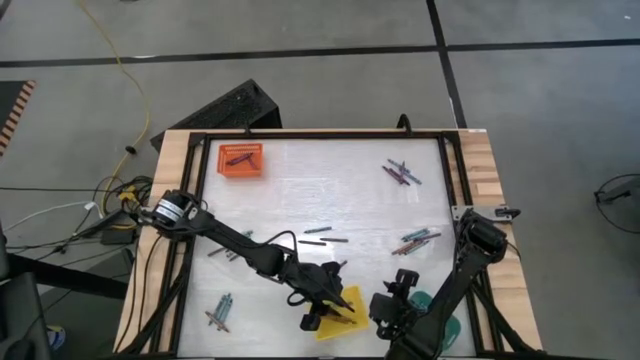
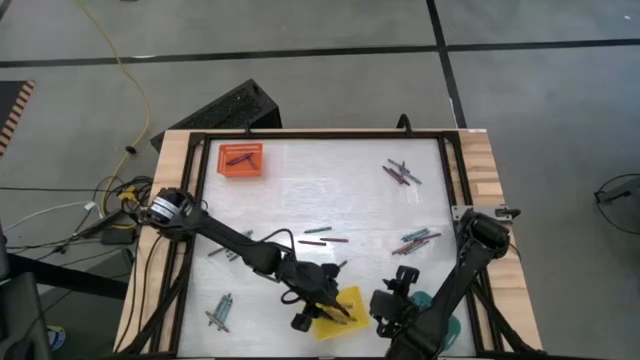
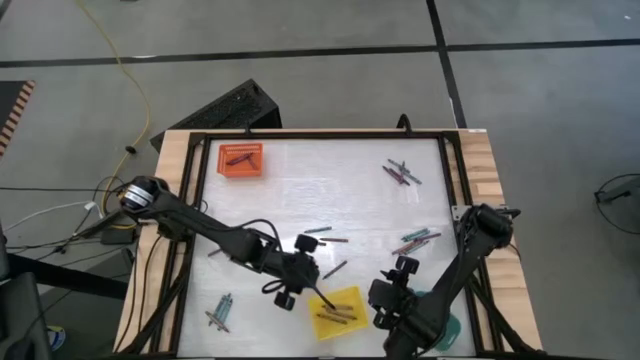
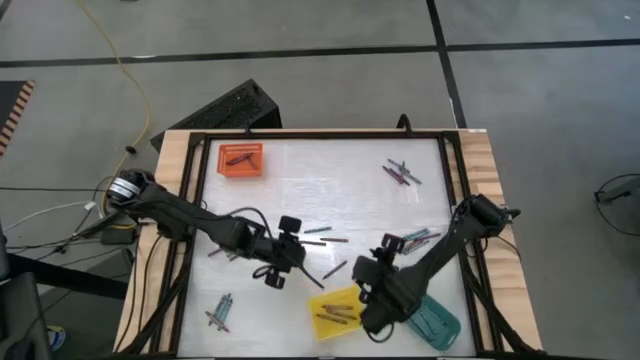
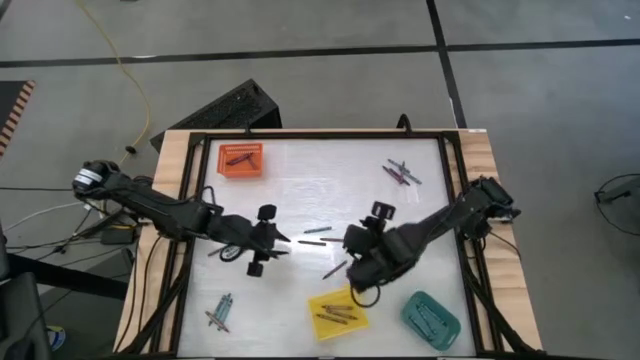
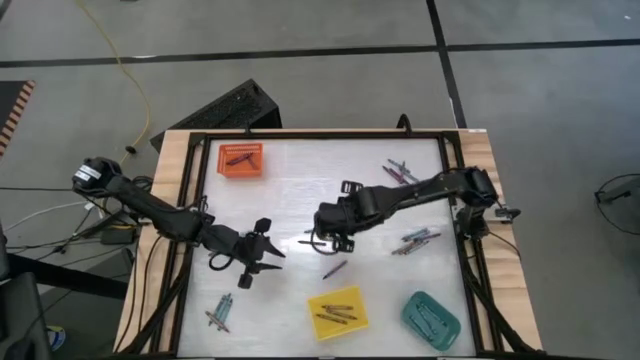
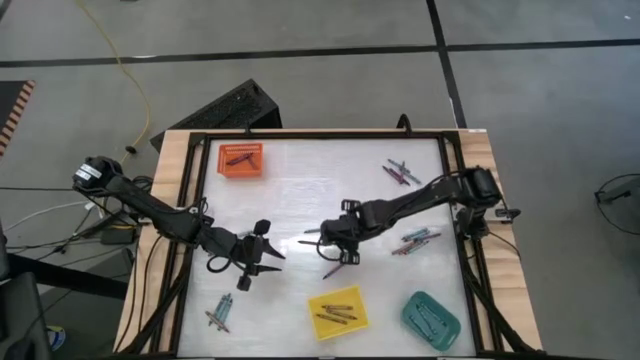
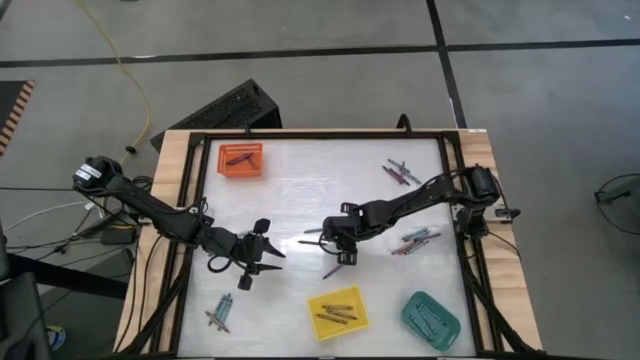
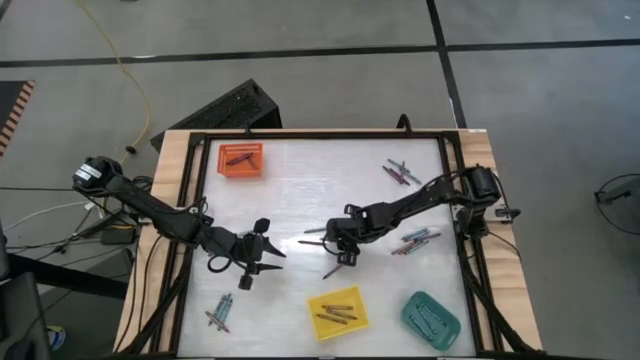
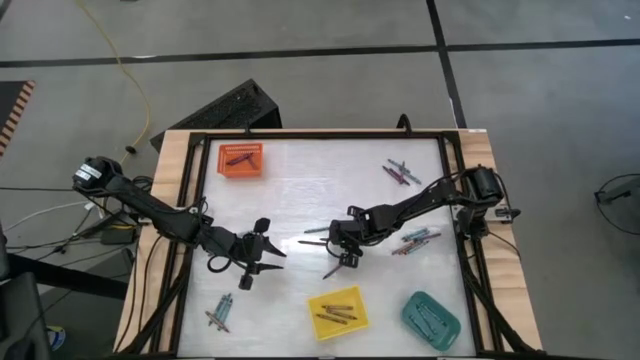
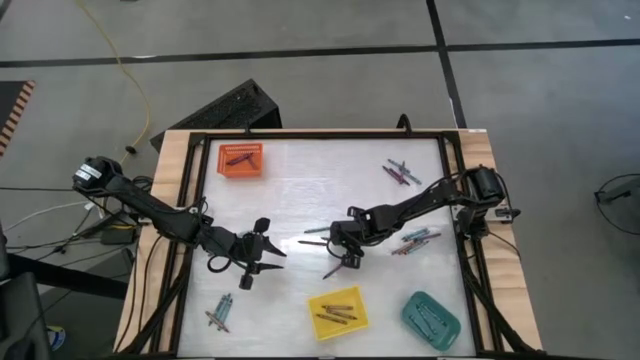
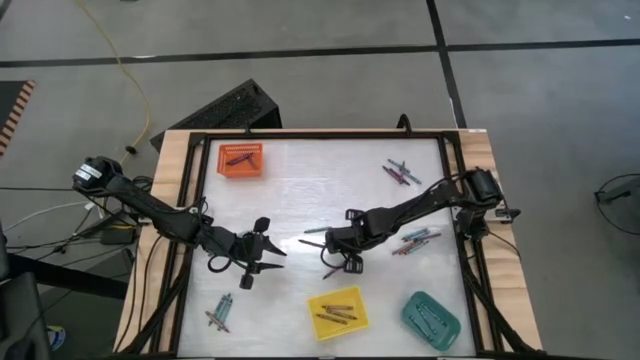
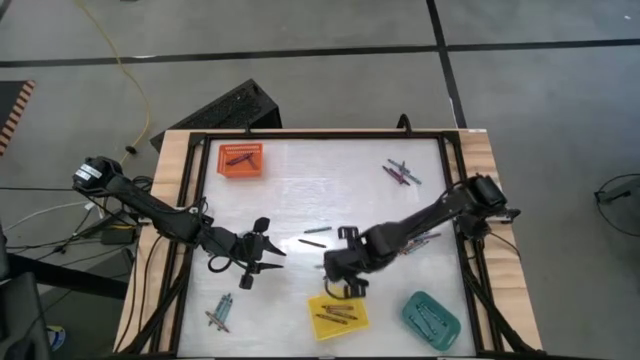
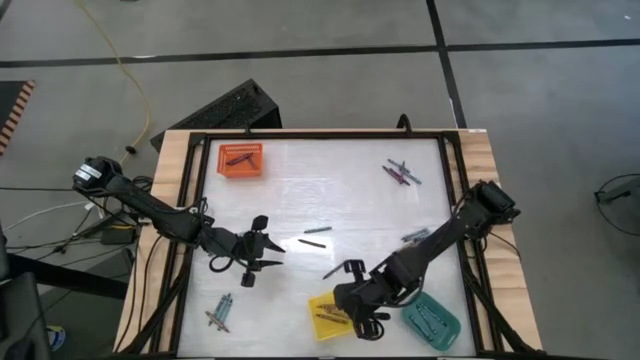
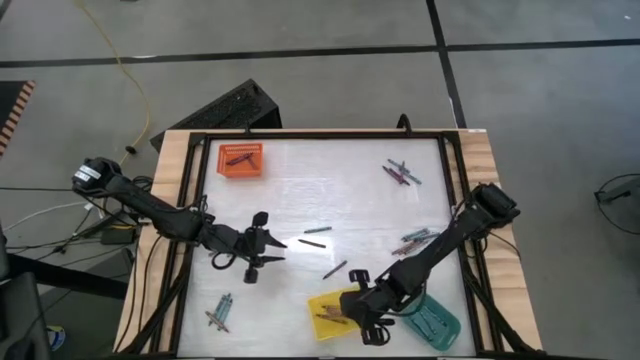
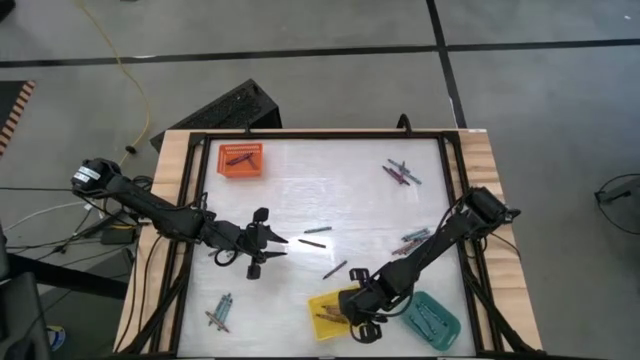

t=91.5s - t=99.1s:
Task: Sort crayons
Put the brown crayon into the yellow bin

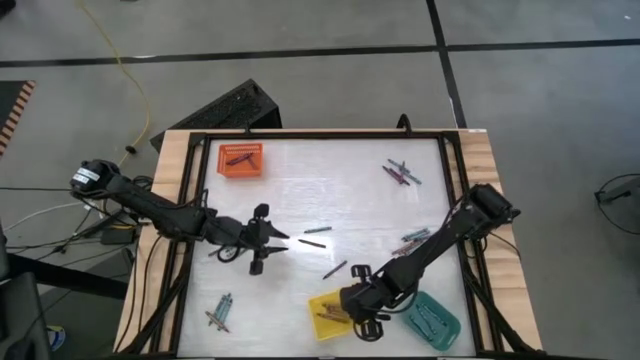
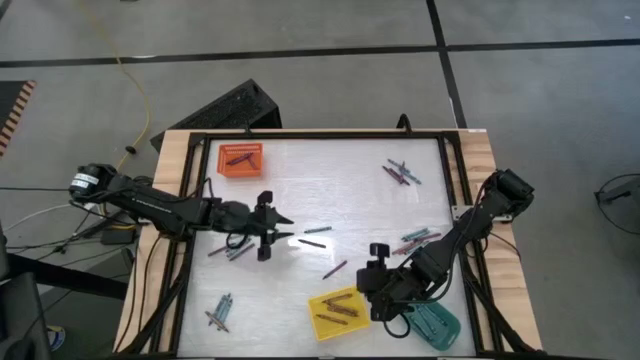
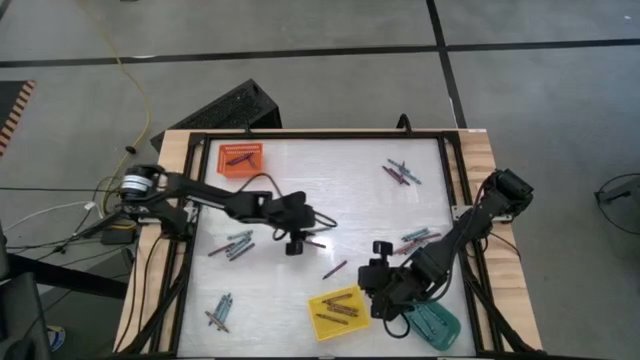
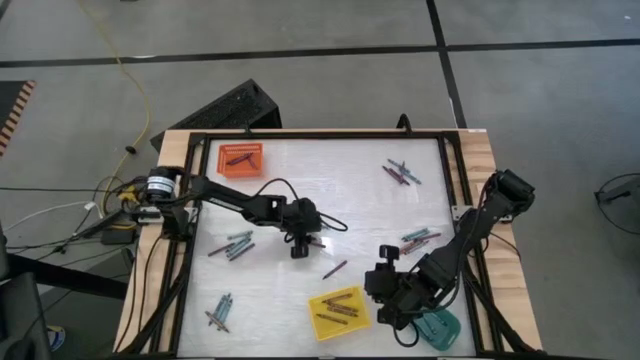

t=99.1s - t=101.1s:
Put the blue crayon into the green bin

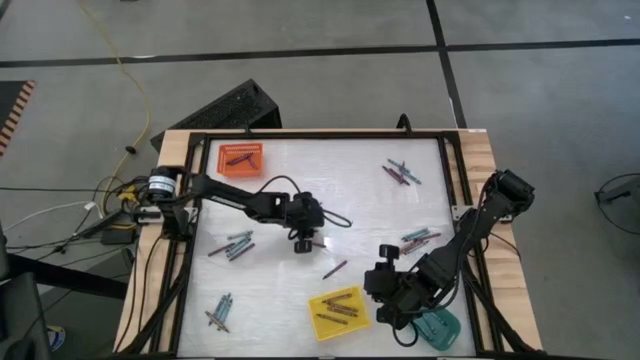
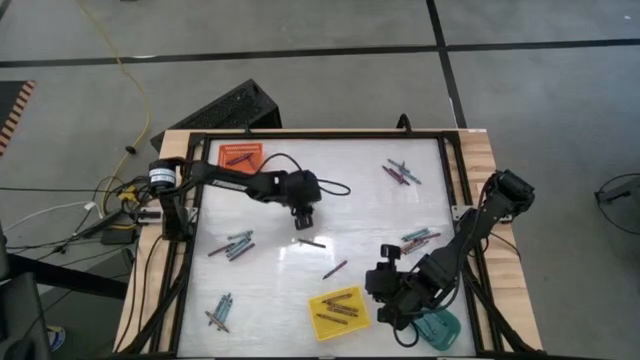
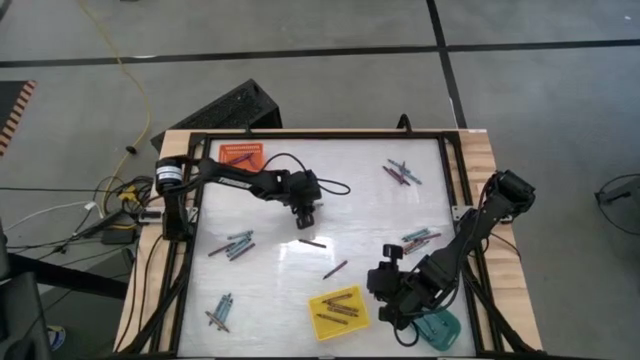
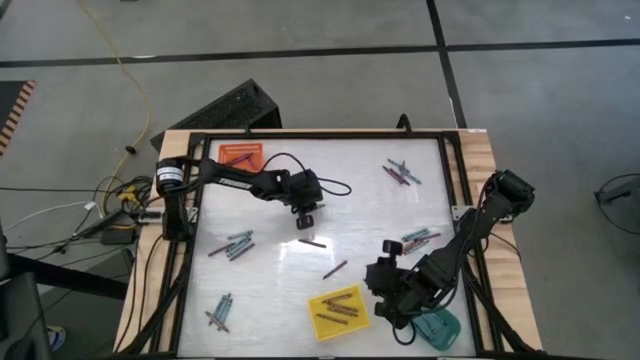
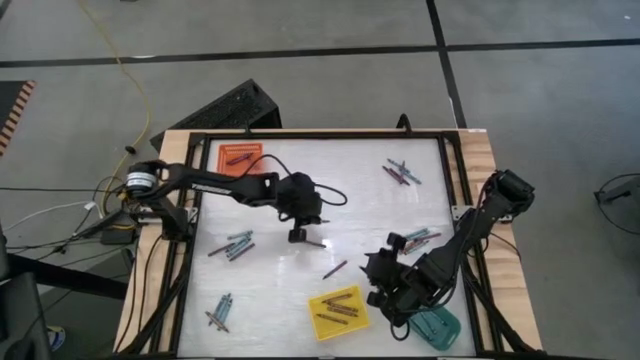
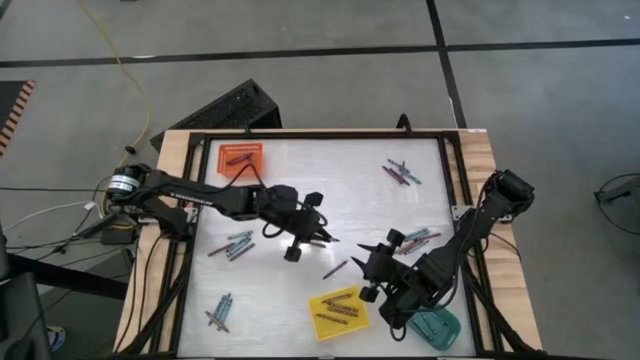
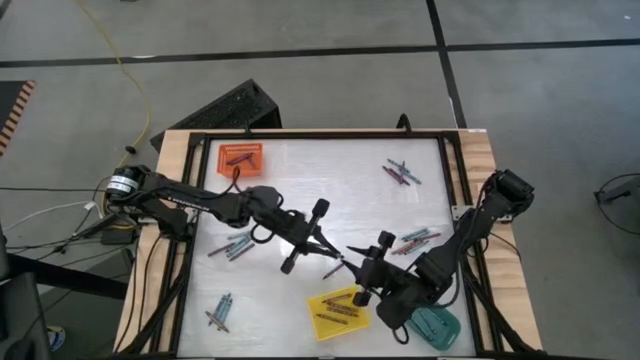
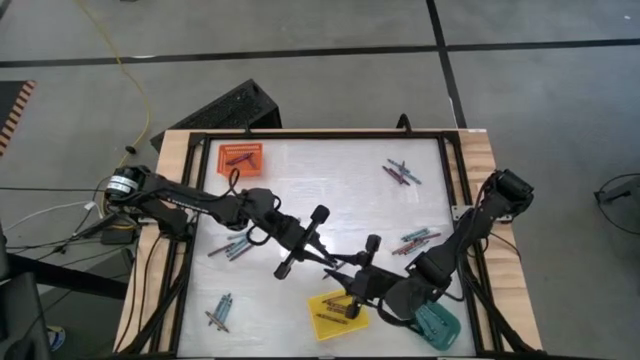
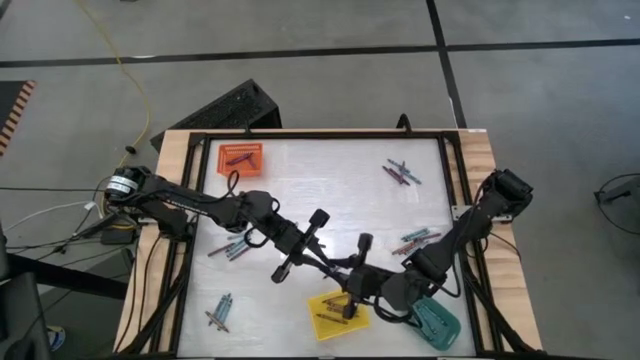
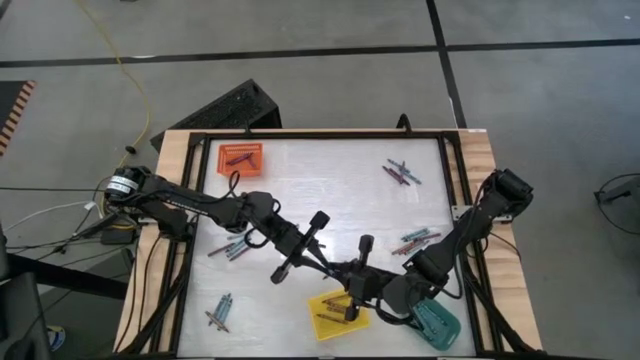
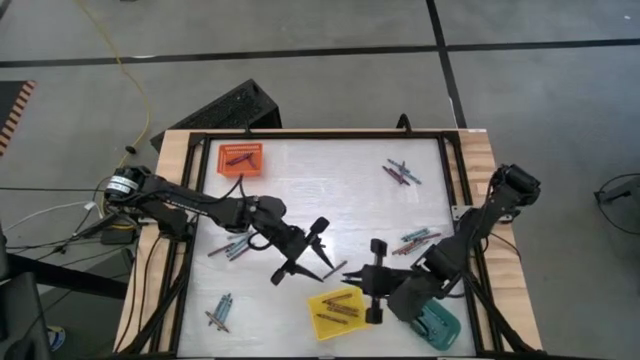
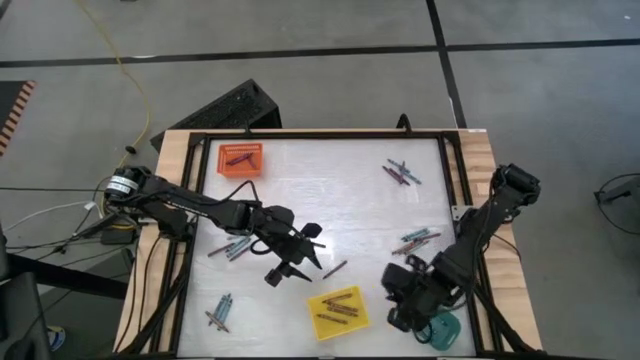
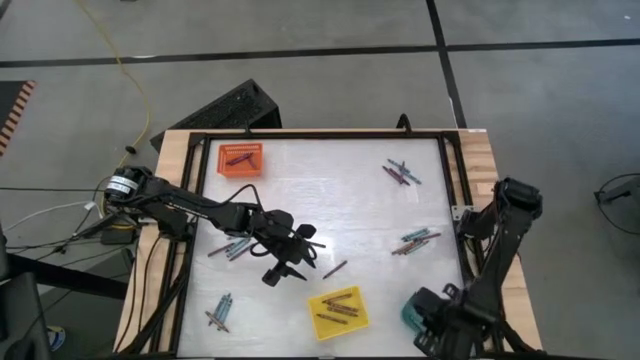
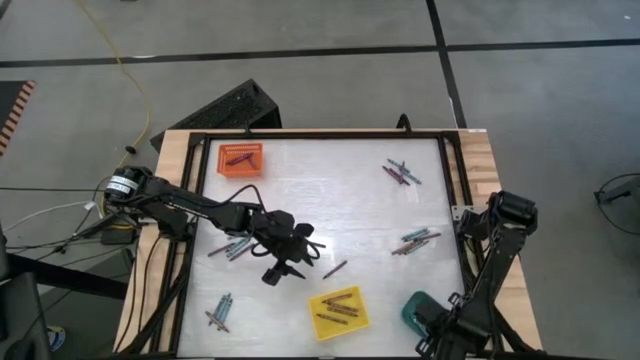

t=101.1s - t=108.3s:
Put the blue crayon into the green bin

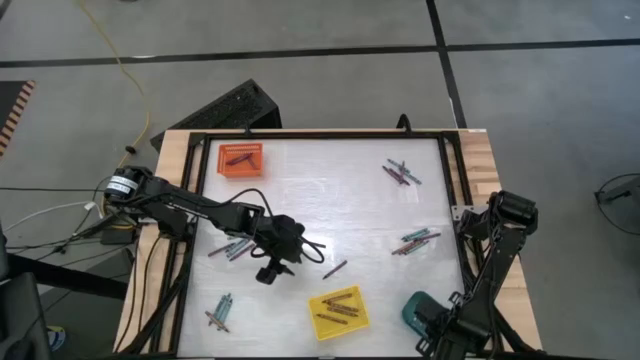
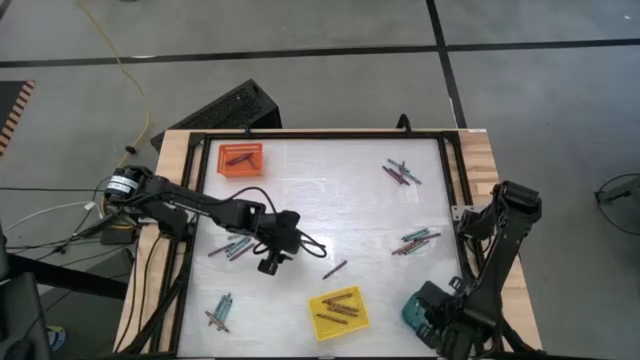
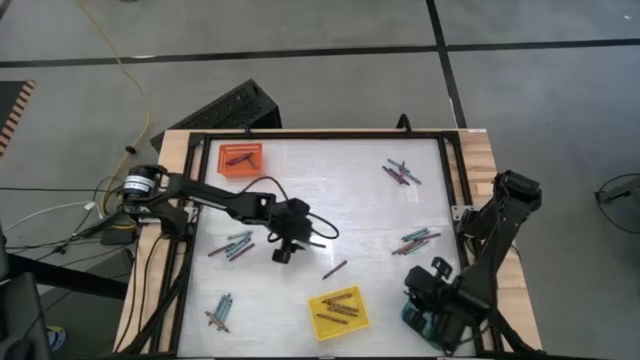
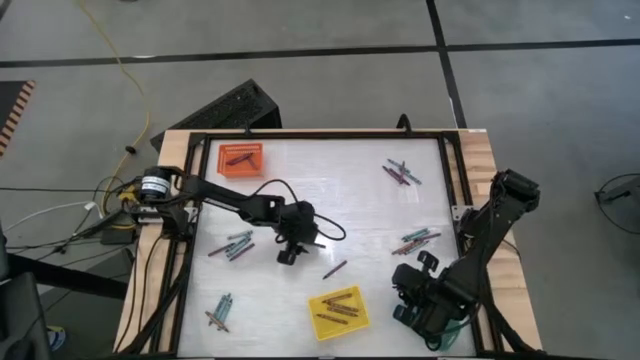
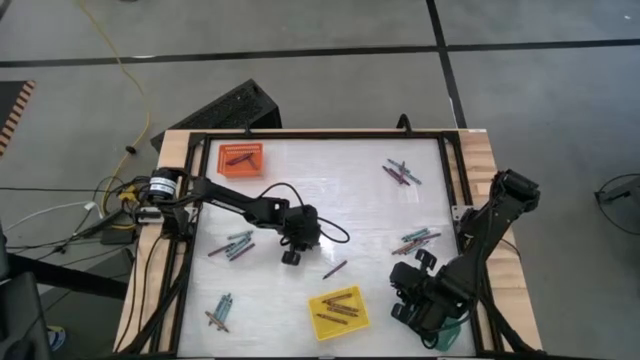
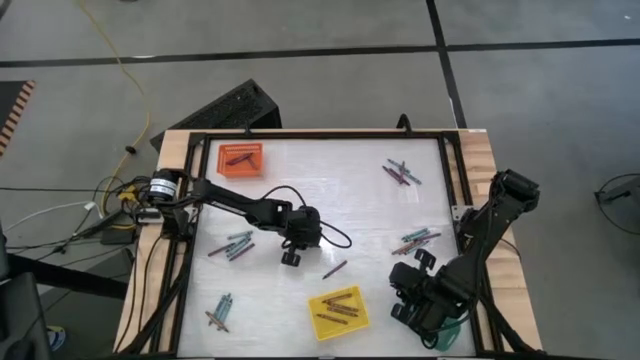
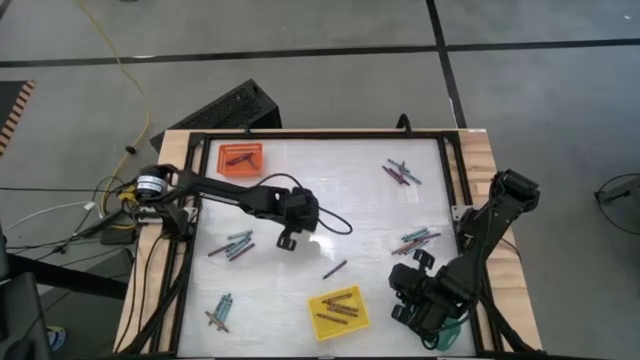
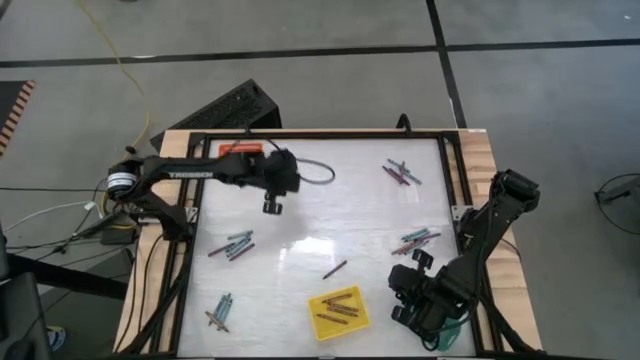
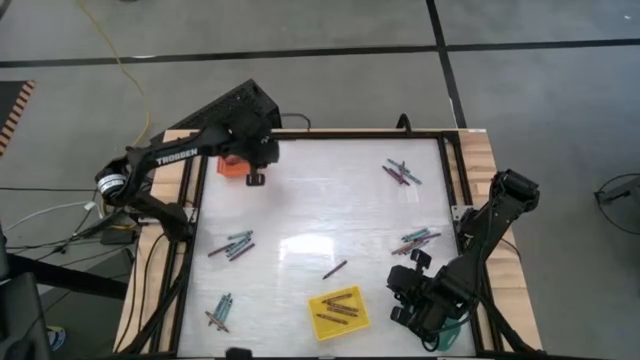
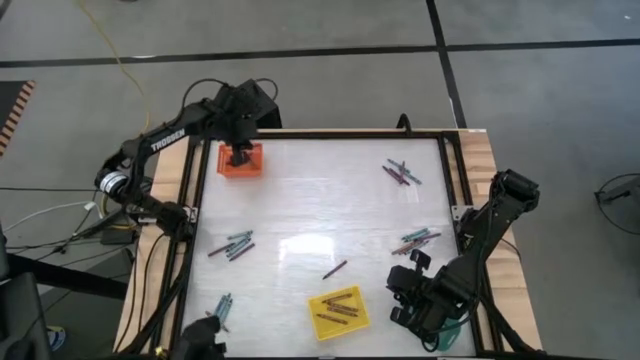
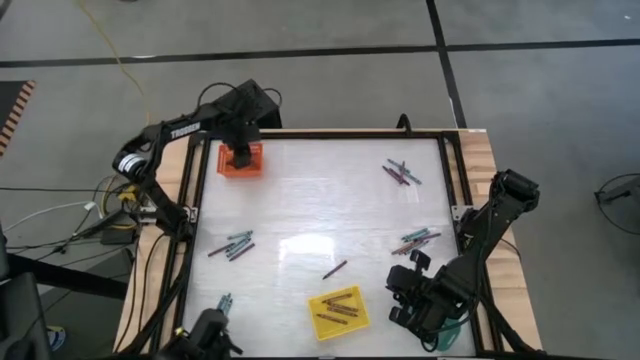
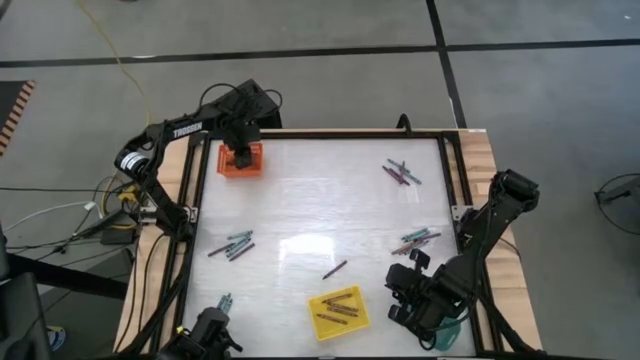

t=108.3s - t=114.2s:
Put the purple crayon into the orange bin
